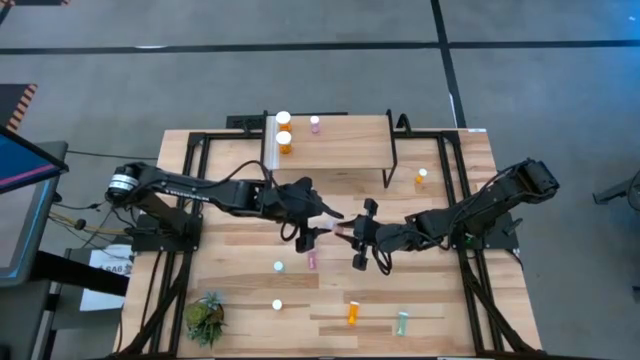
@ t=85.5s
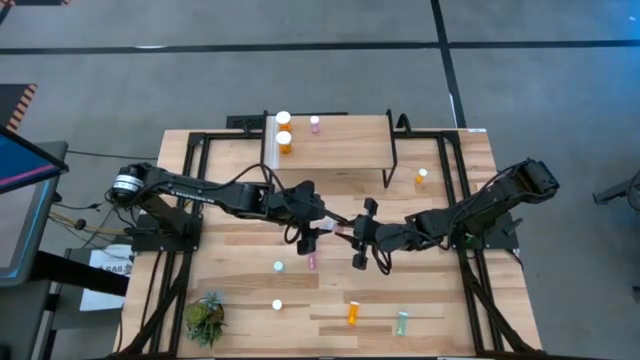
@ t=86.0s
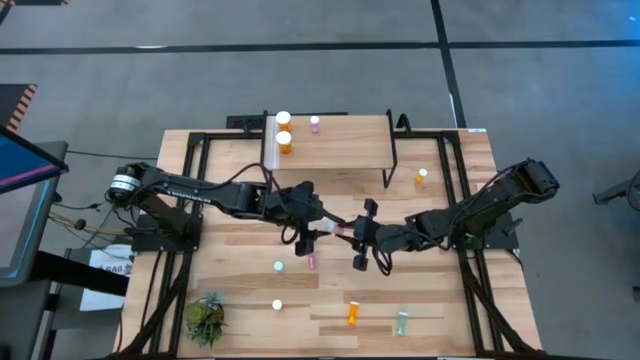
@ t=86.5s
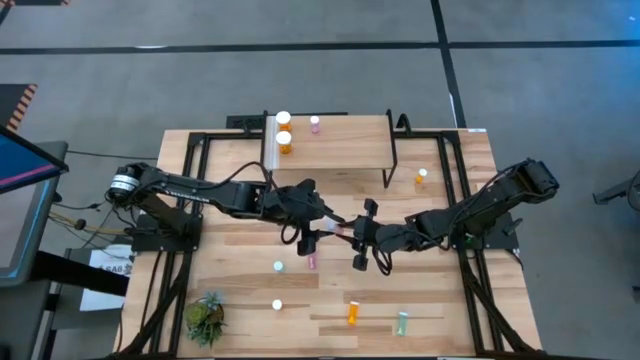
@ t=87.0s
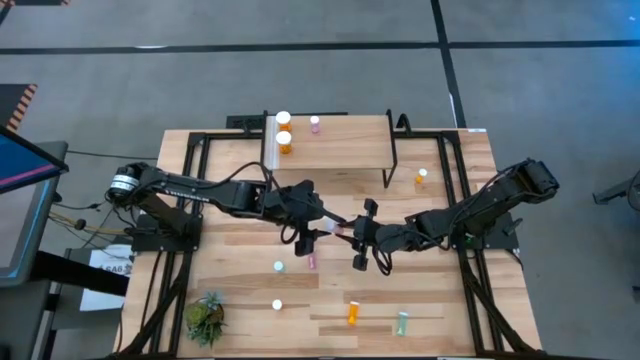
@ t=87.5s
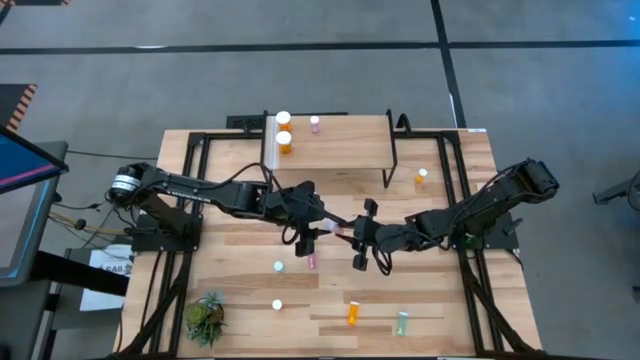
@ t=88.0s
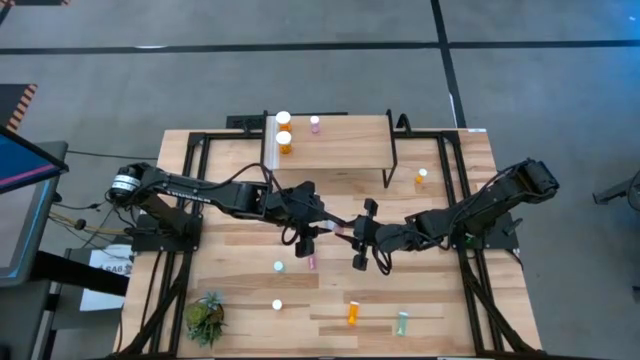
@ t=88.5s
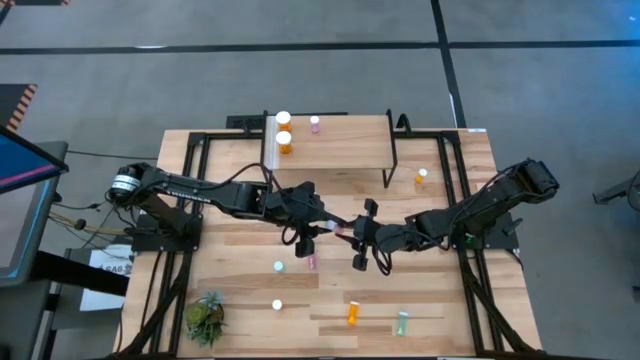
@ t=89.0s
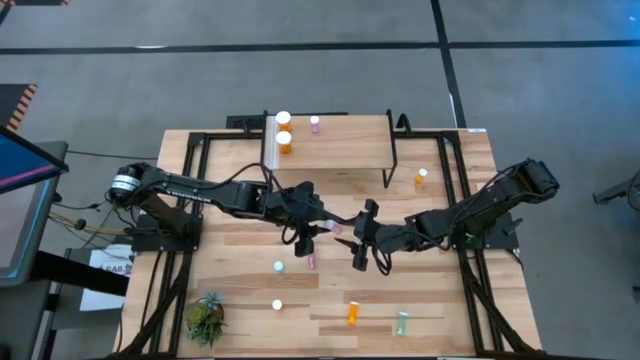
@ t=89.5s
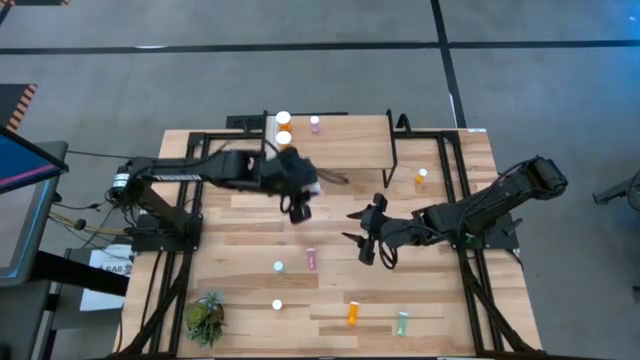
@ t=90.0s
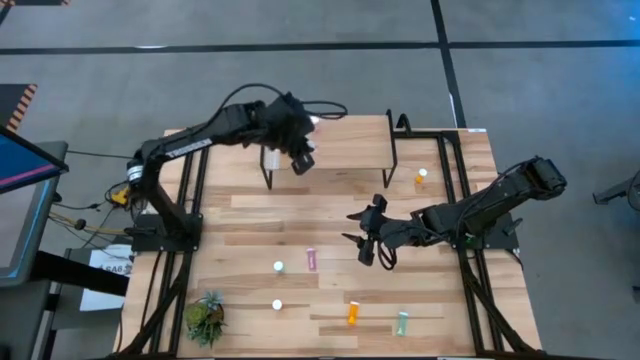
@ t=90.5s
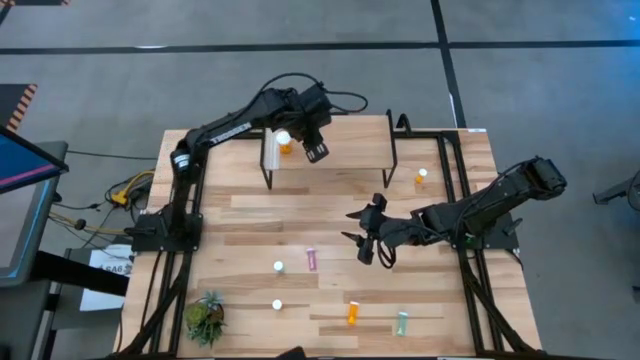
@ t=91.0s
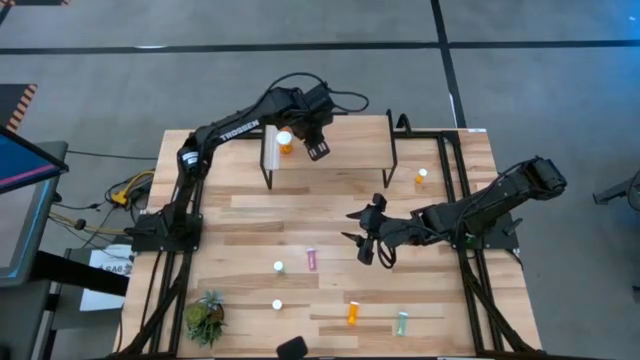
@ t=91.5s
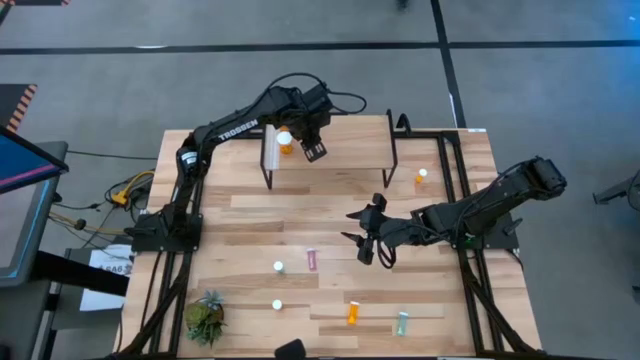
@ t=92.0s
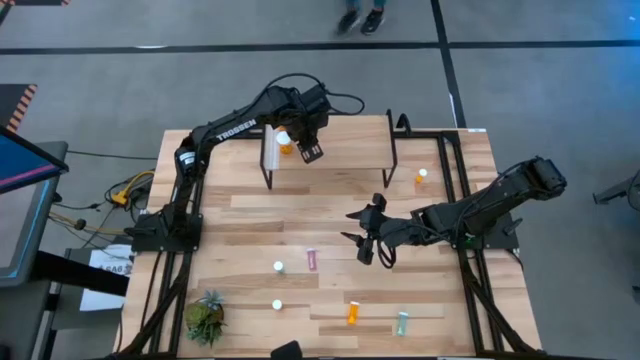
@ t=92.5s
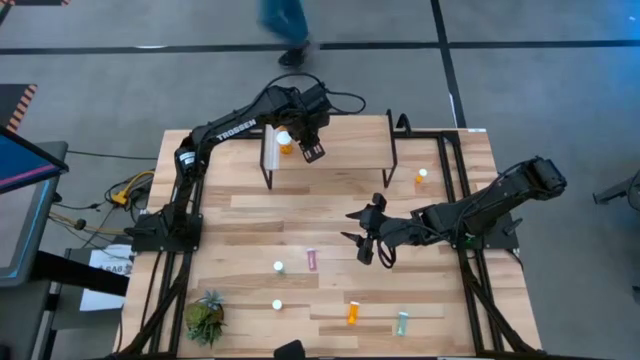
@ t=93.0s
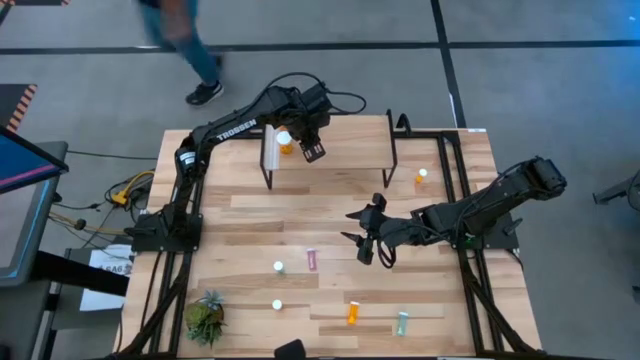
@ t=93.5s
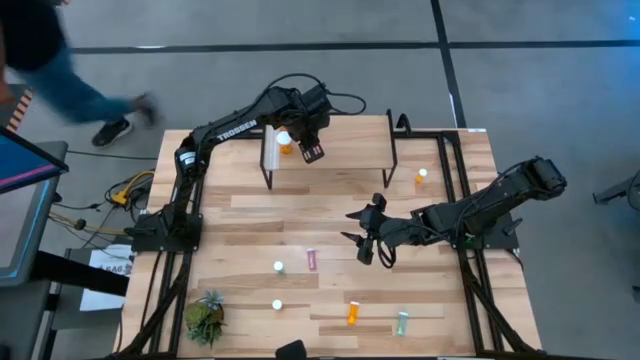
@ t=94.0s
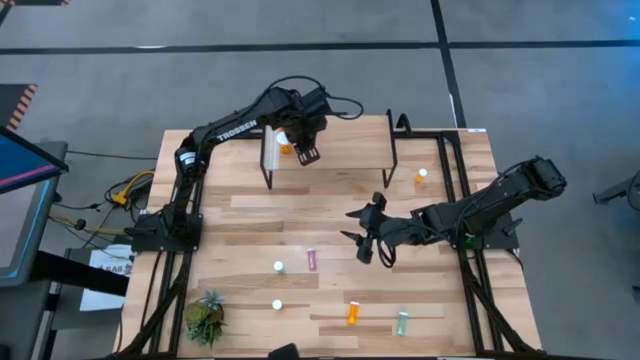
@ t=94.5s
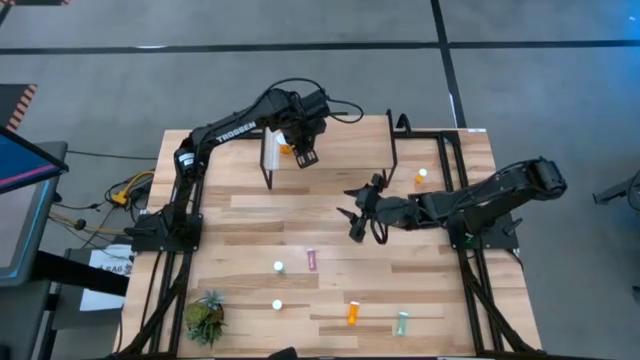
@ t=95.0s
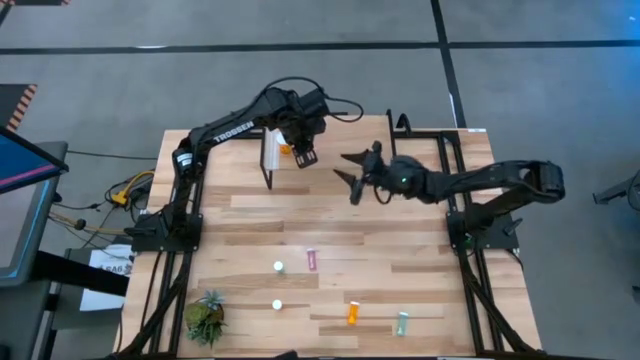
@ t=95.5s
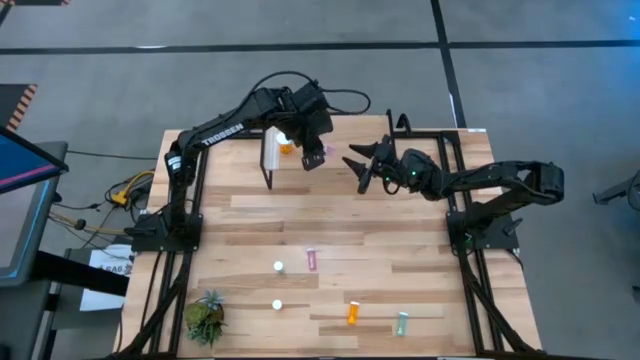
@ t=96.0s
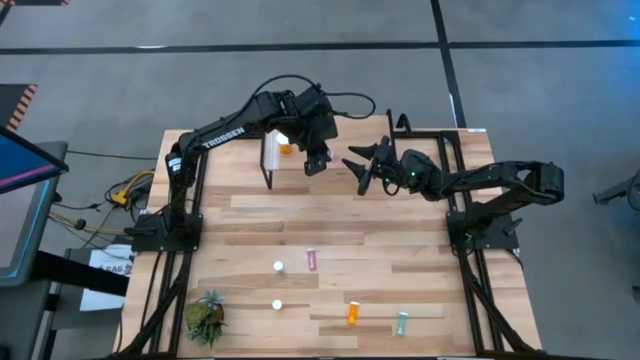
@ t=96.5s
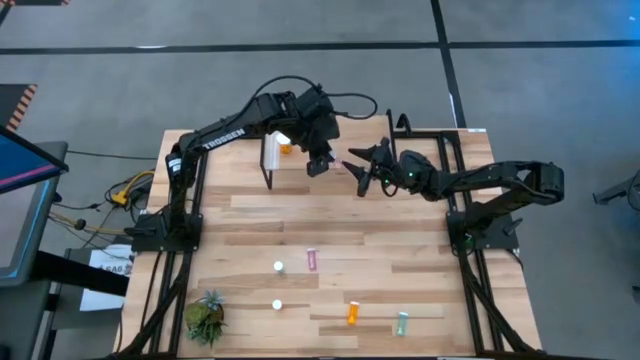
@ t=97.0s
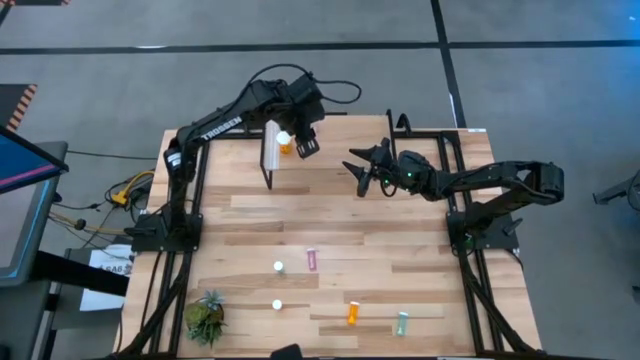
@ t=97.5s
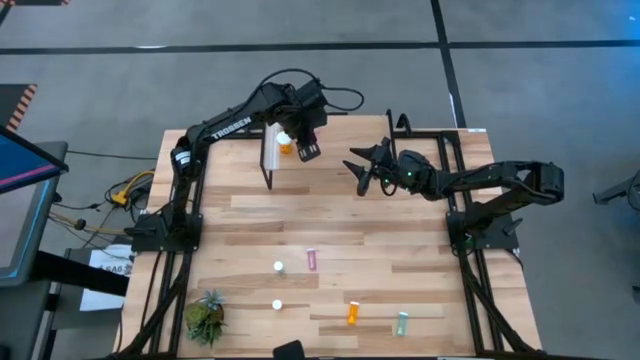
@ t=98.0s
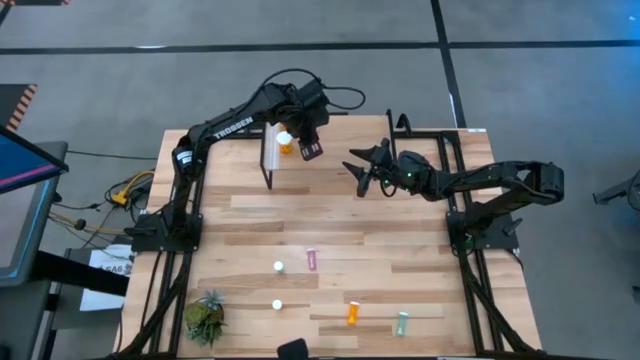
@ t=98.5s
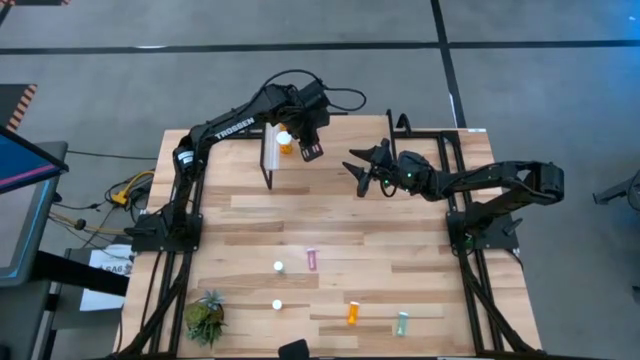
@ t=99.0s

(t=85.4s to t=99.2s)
Task: Pick and place medicine bottles onto shelf by color
Put the right pink pill bottle on the shelf aligned with the other pink pill bottle

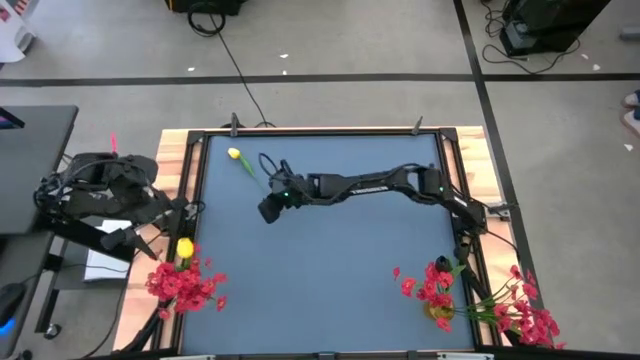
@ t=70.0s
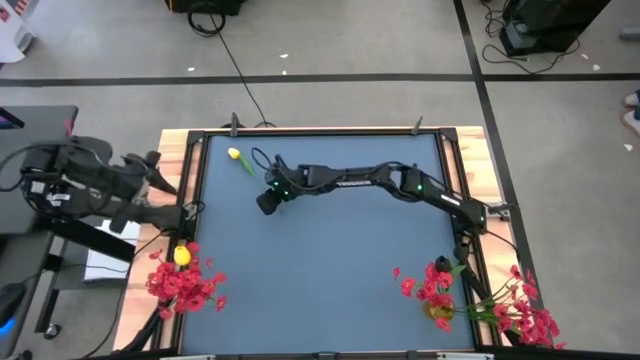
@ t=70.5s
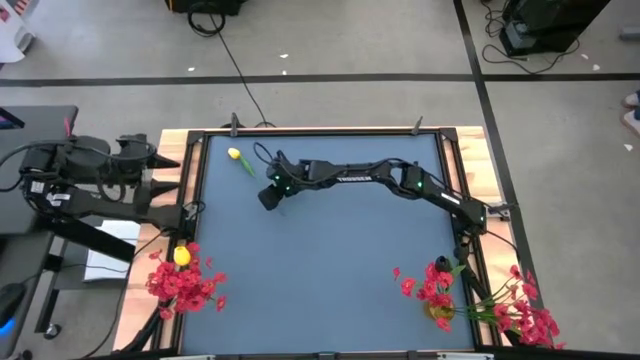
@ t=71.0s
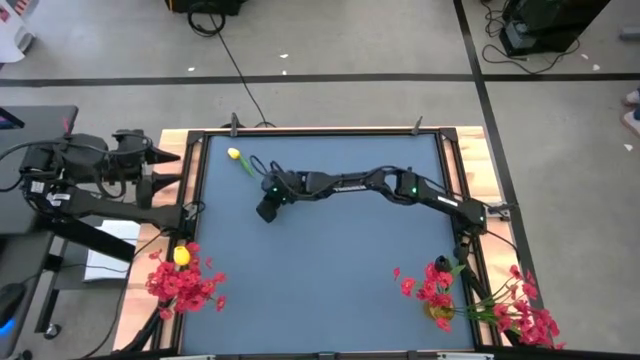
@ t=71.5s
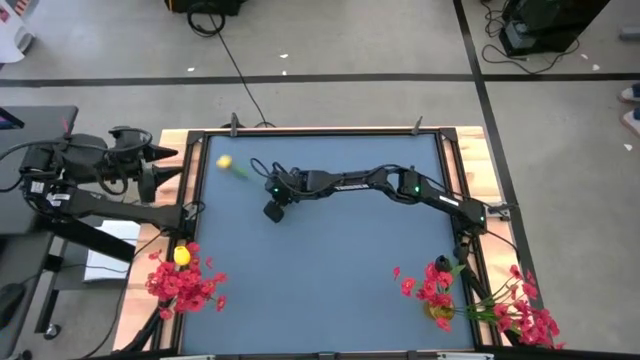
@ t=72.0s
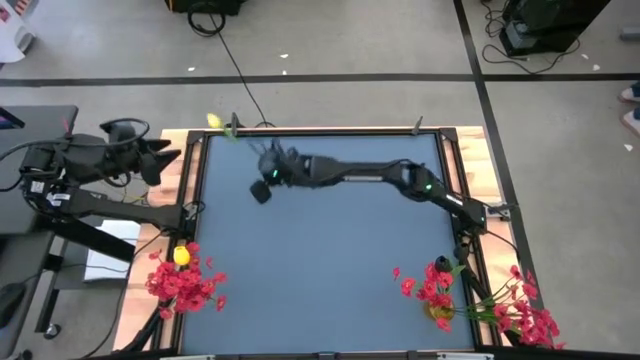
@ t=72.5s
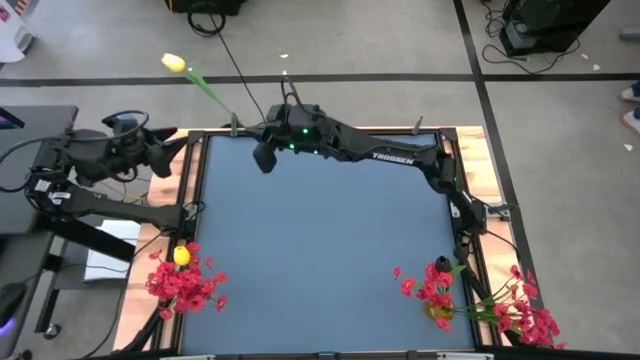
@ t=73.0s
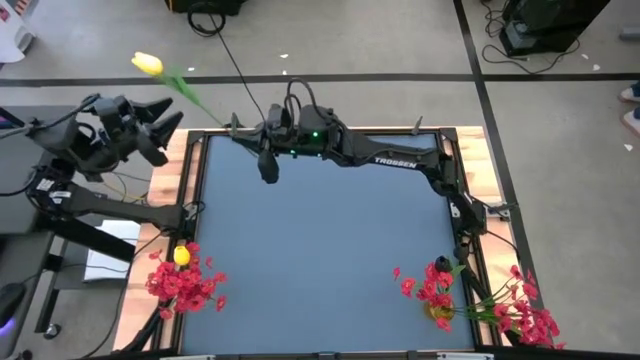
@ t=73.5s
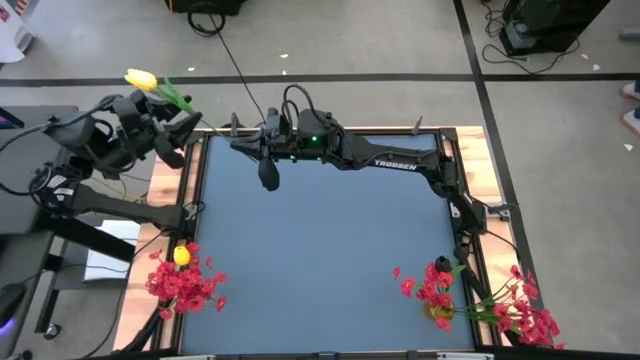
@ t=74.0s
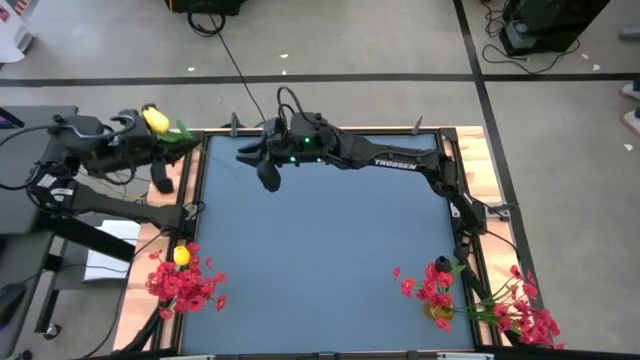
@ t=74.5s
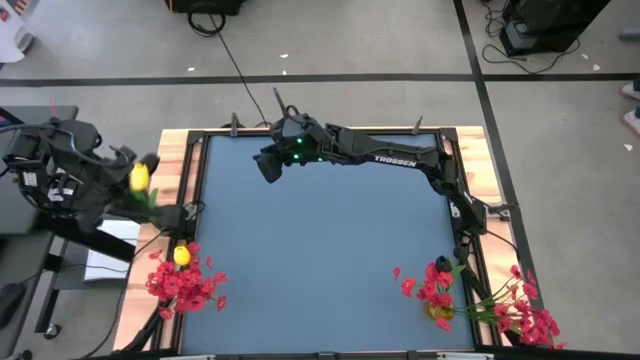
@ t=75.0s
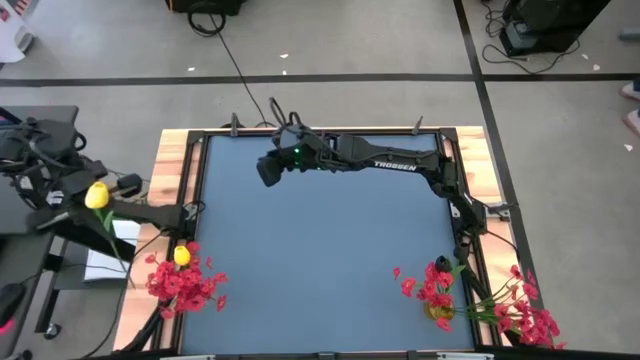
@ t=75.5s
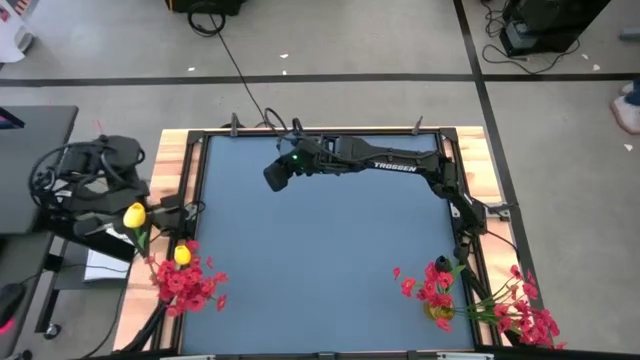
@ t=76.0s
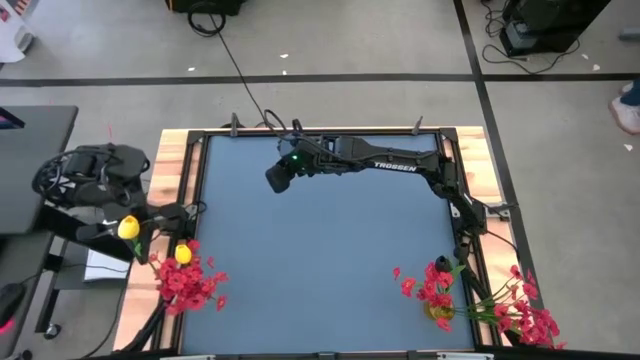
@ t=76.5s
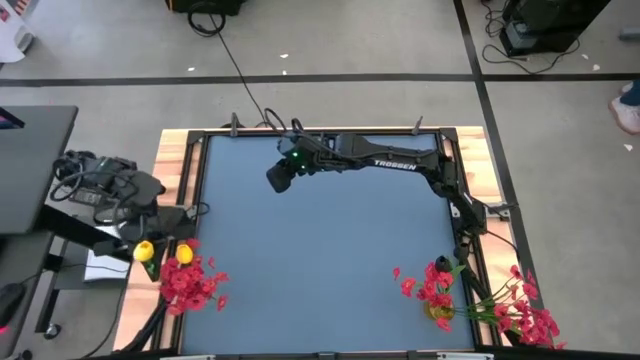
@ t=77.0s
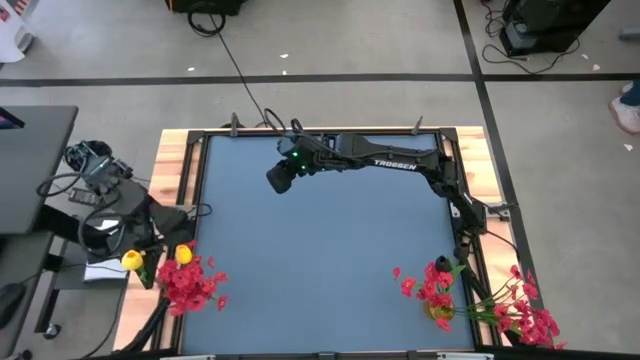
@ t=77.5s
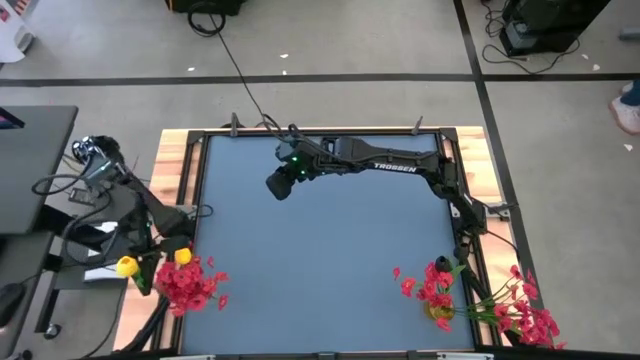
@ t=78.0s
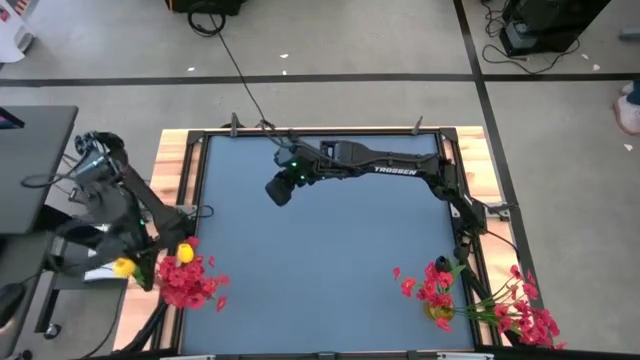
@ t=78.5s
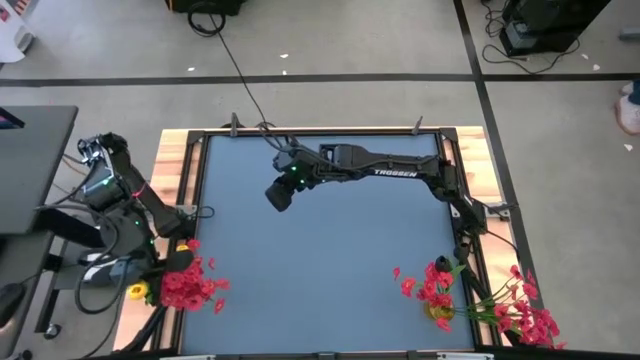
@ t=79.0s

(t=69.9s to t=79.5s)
Task: Sort flowers into vase by color
Put the yellow flower into the transparent vase
